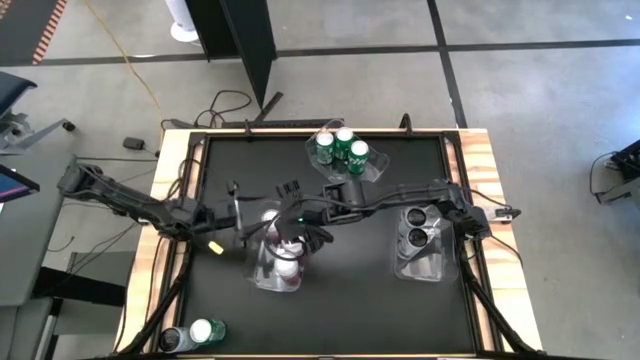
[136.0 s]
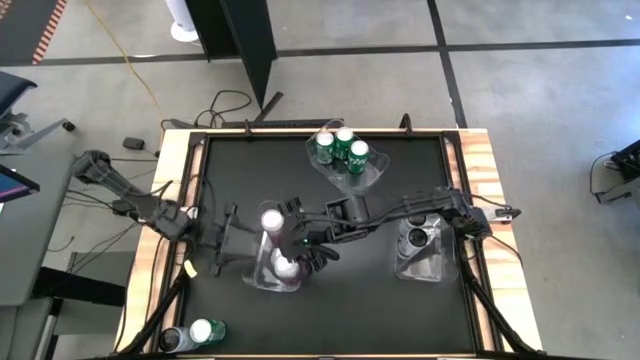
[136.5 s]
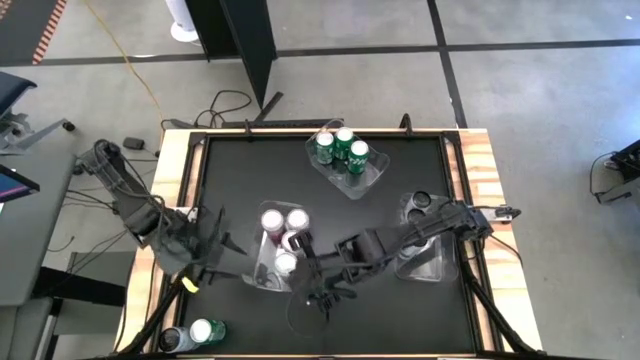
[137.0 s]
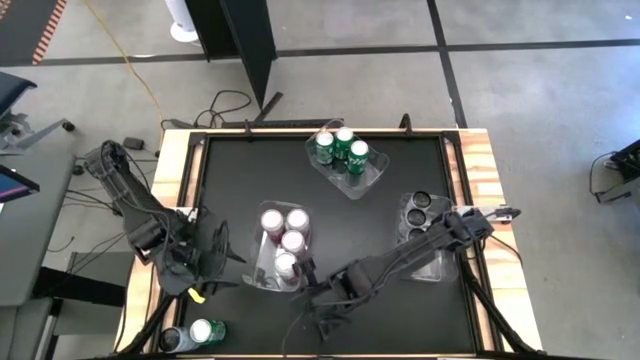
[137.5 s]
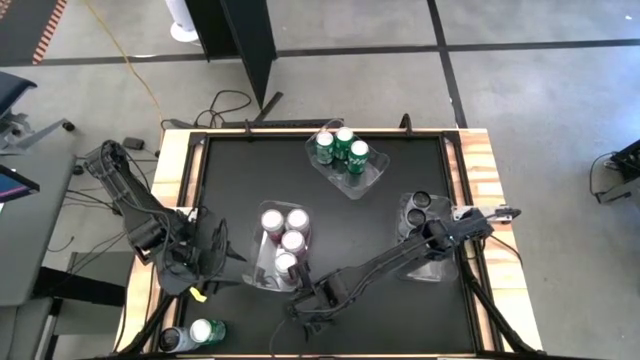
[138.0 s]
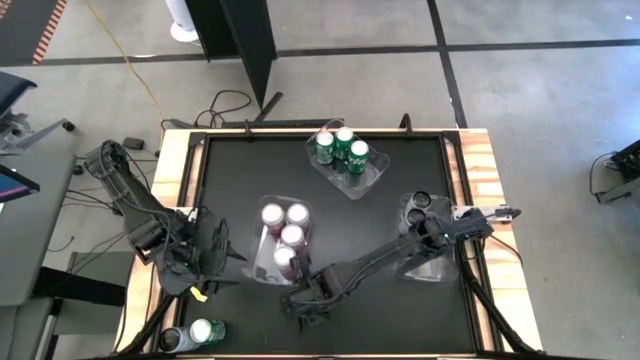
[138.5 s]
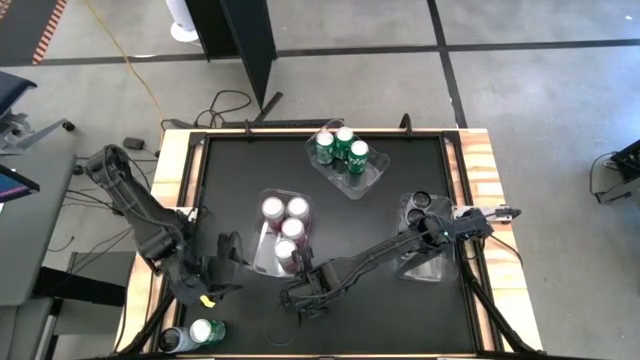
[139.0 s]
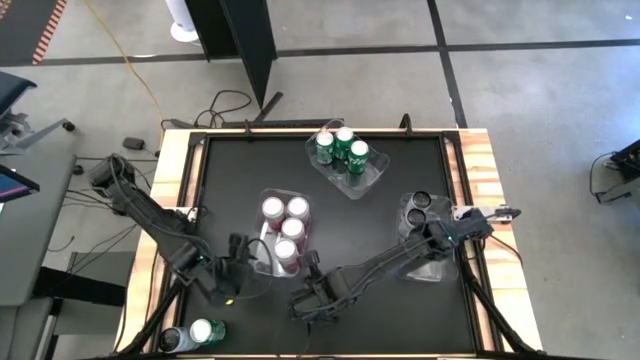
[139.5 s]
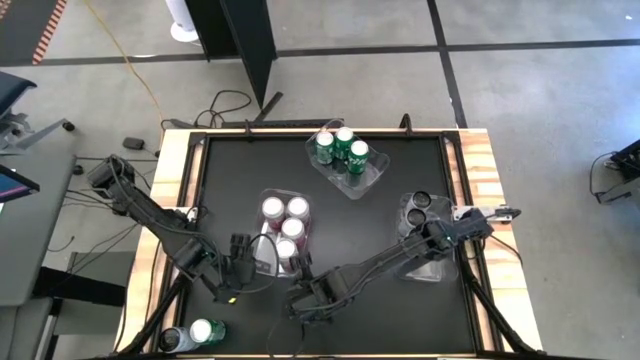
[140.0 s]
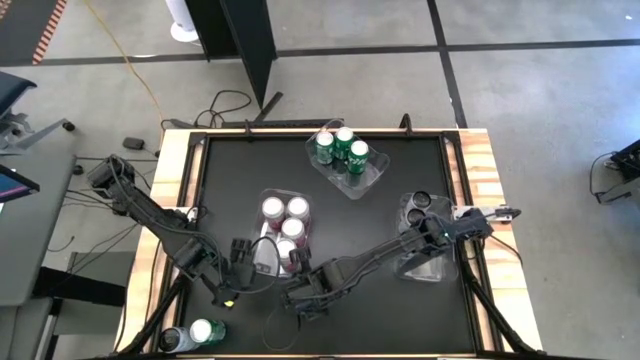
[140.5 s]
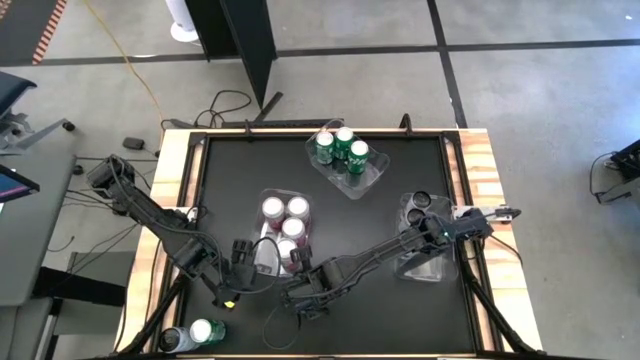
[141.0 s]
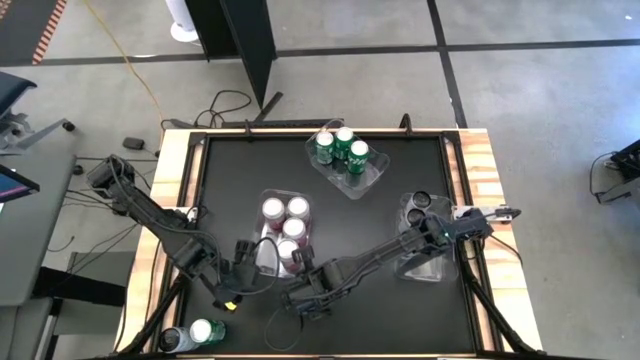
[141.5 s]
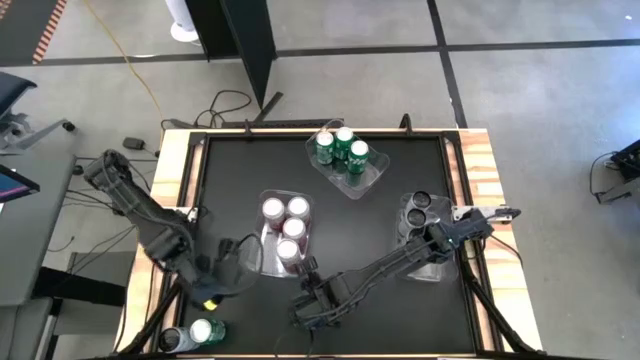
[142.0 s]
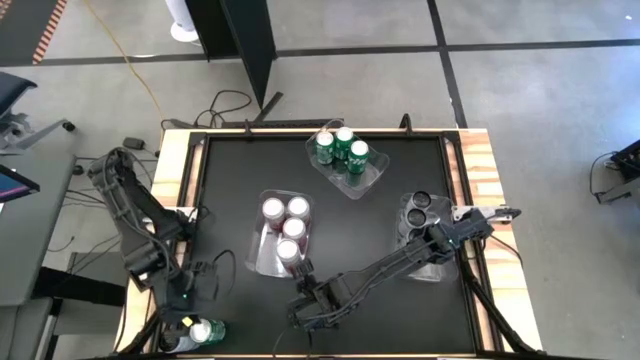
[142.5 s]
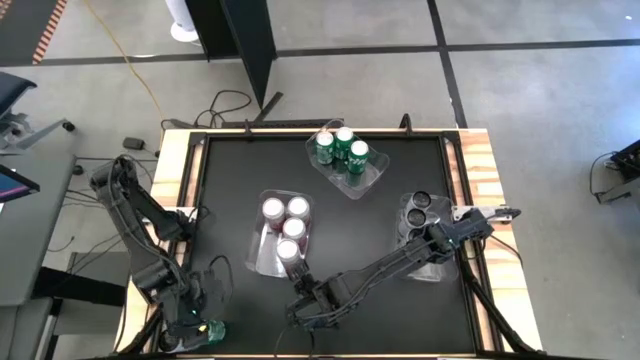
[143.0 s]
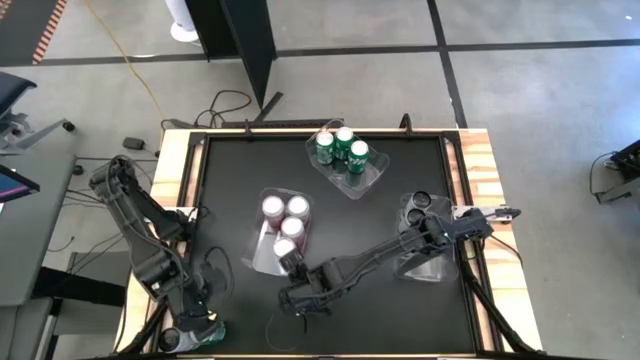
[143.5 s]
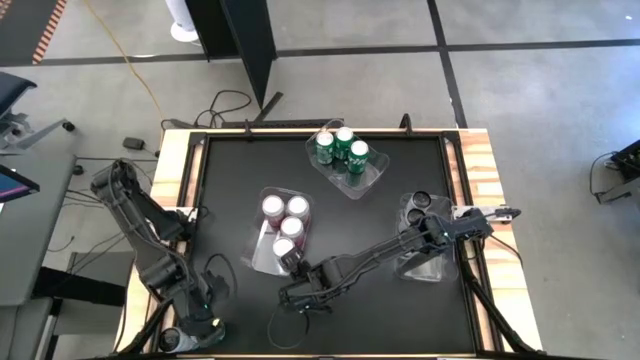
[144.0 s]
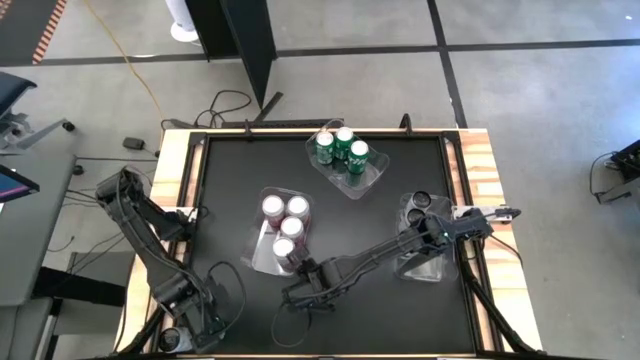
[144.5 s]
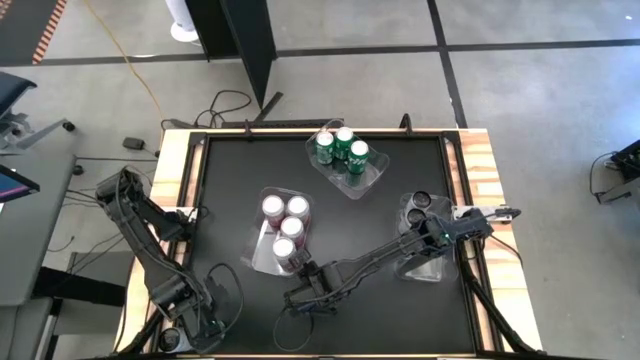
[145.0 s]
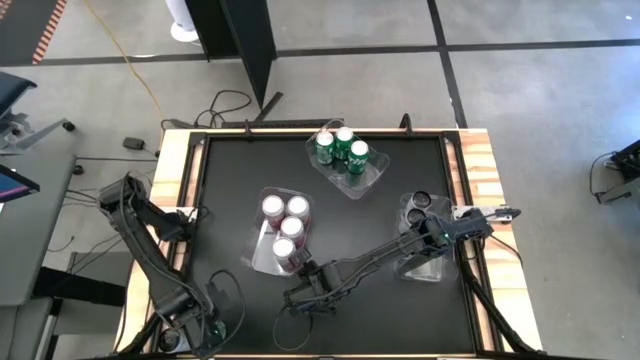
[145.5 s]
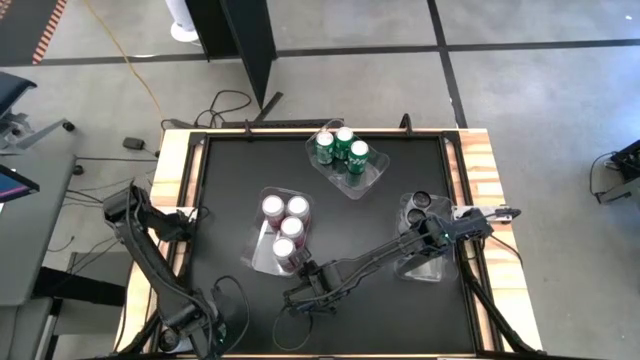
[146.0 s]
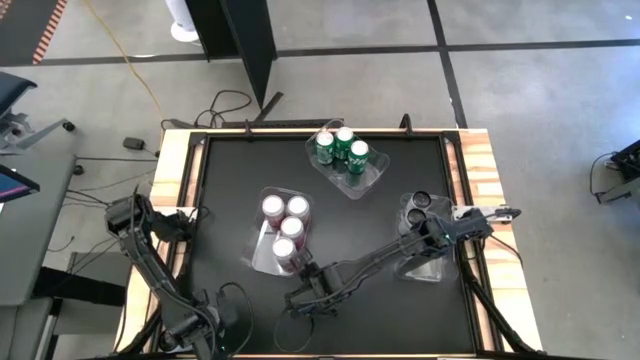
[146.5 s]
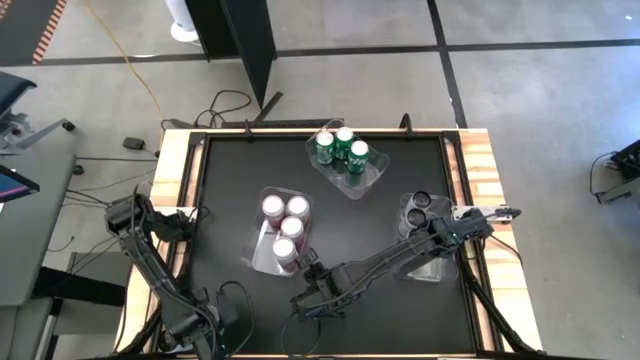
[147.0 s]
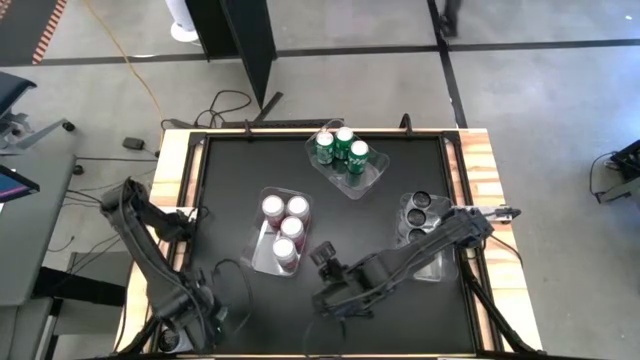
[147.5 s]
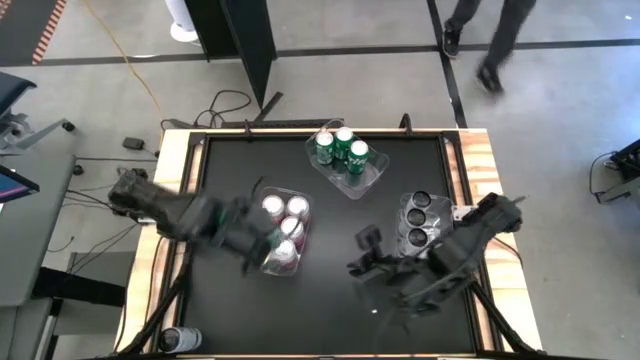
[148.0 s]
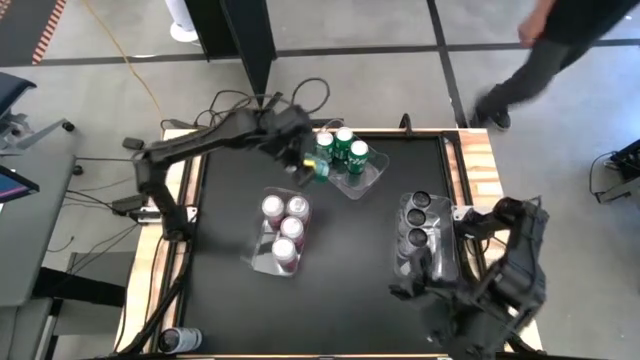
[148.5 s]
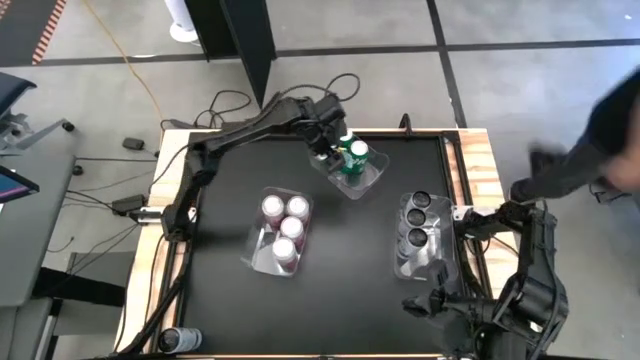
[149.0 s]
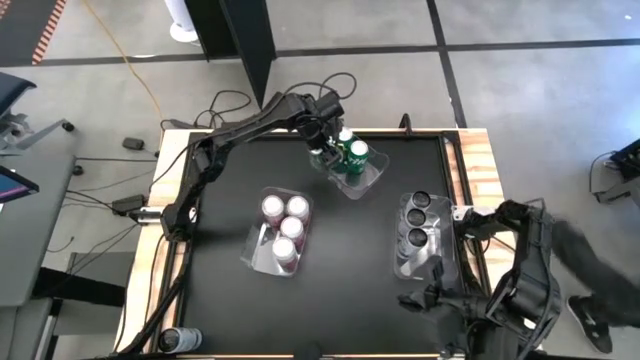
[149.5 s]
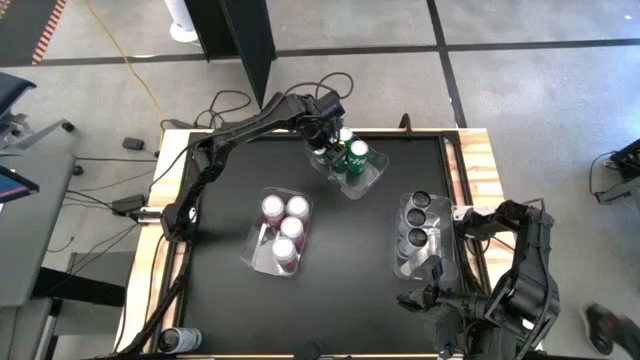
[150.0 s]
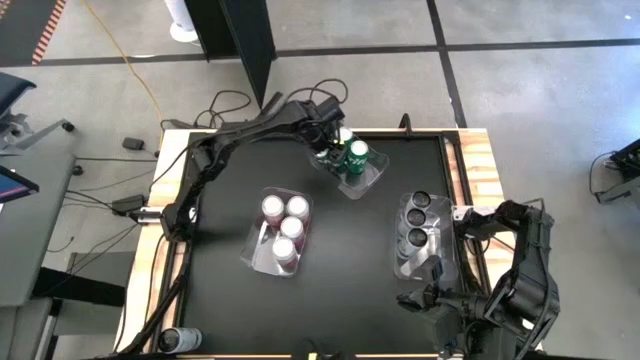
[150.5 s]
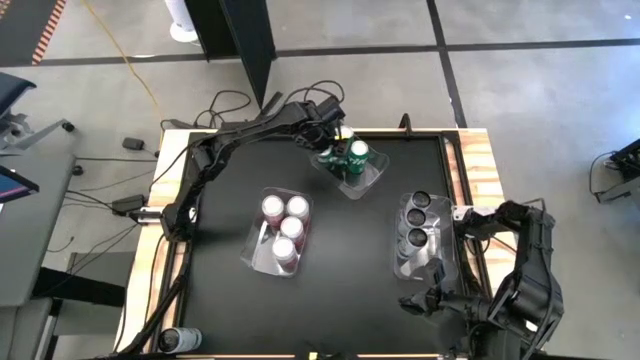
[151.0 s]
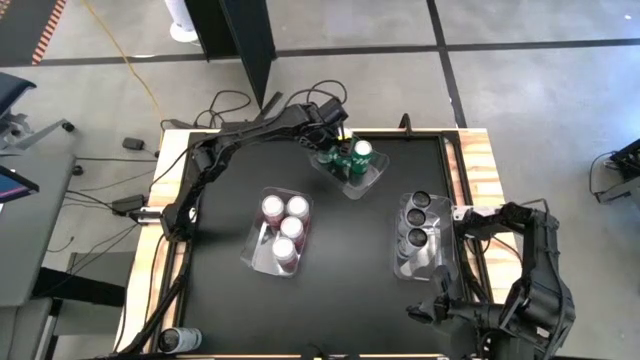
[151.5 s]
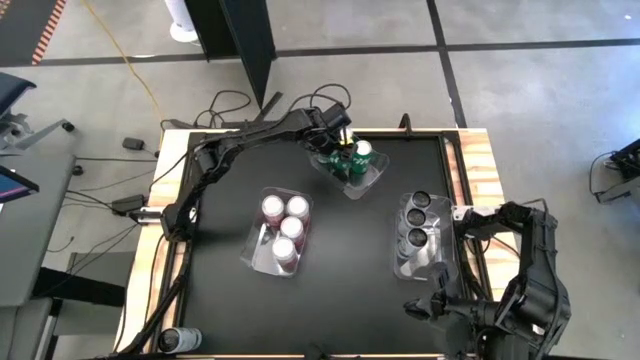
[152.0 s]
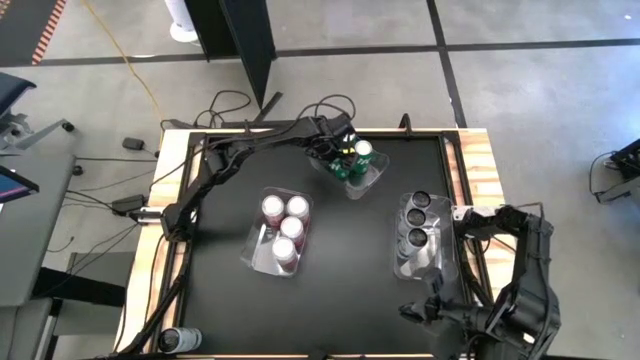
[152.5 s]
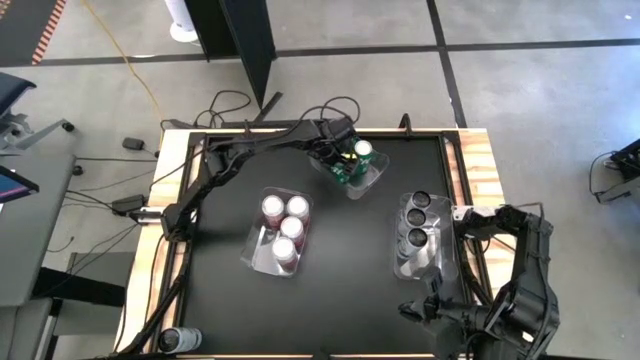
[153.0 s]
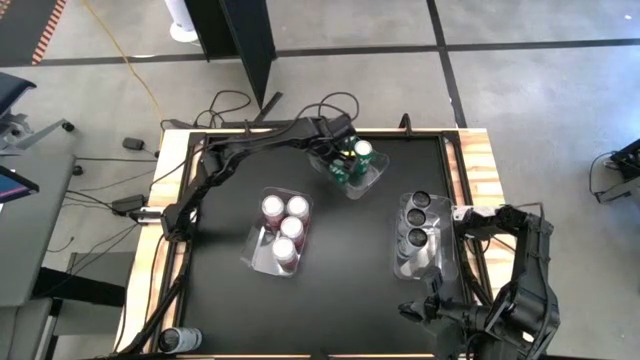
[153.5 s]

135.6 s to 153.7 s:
Task: Sort soda cans
Put the green soda can into the middle transparent bin

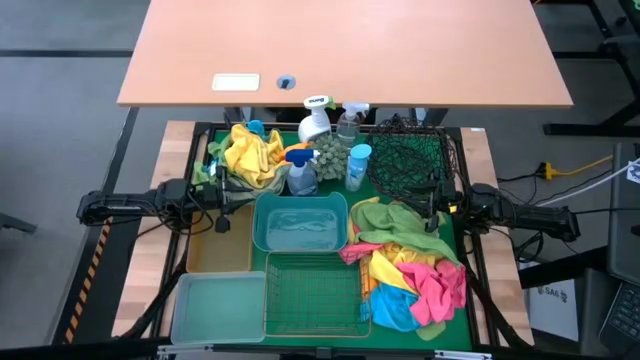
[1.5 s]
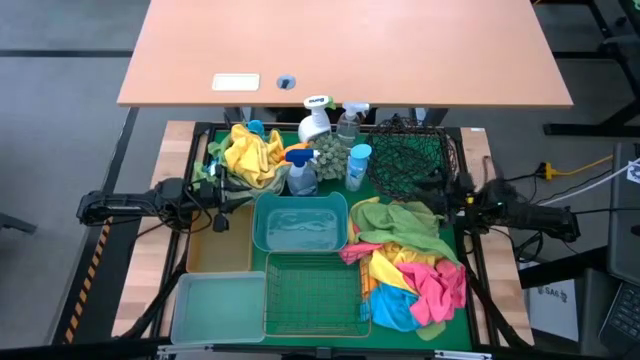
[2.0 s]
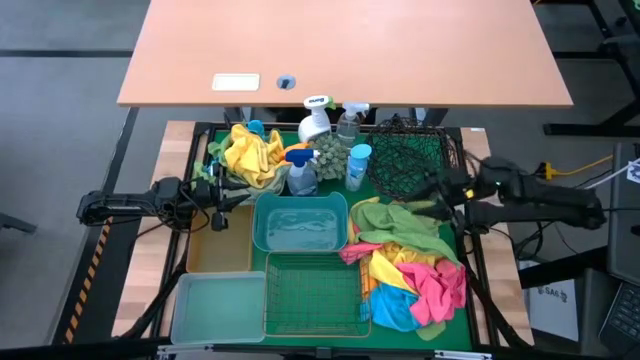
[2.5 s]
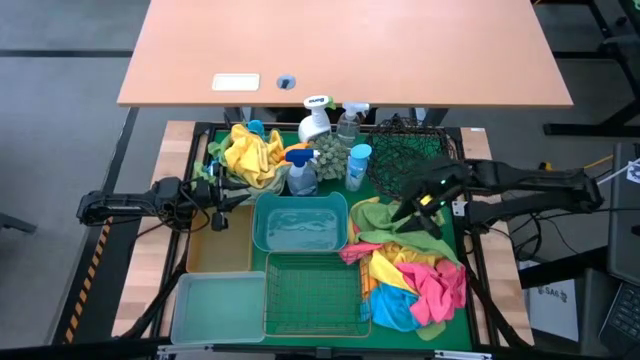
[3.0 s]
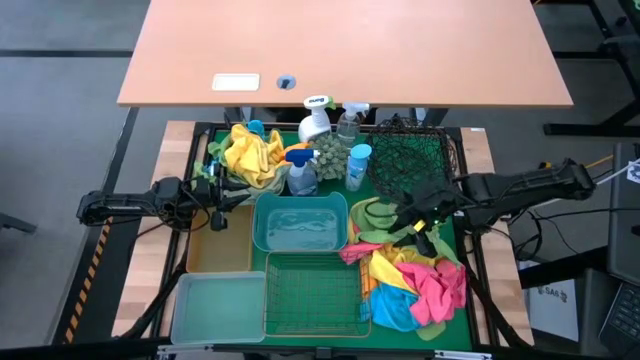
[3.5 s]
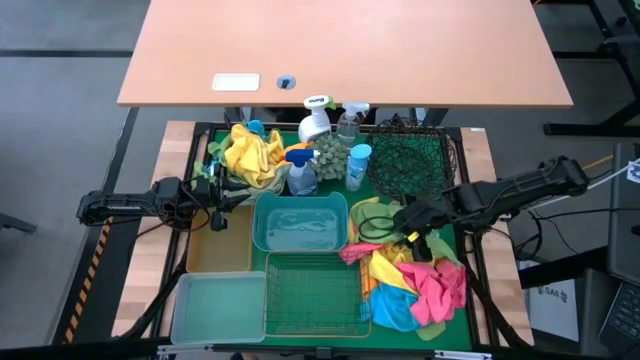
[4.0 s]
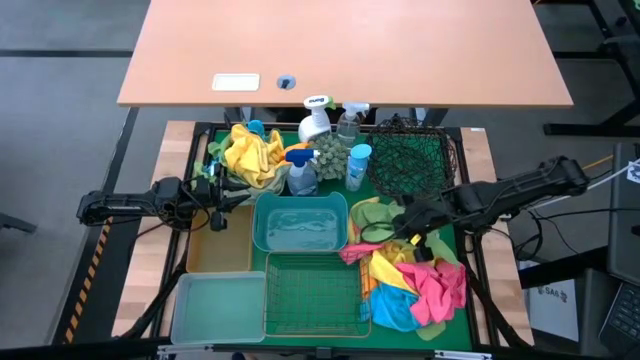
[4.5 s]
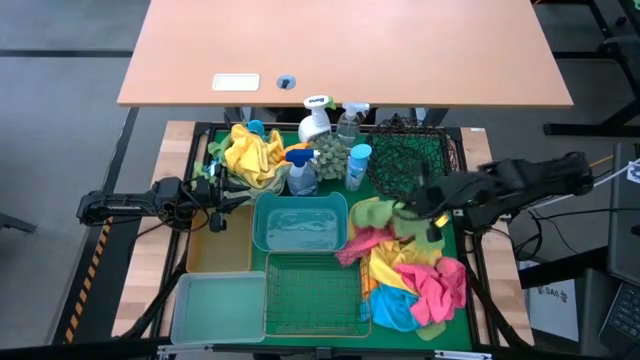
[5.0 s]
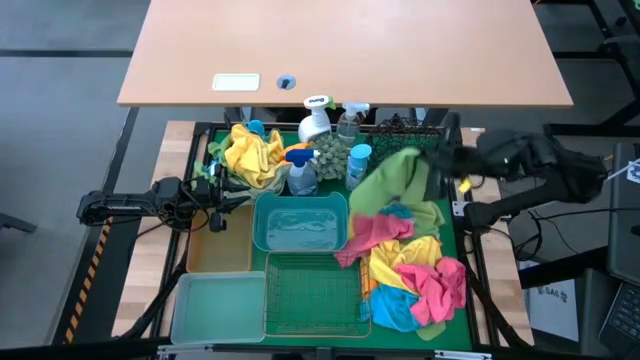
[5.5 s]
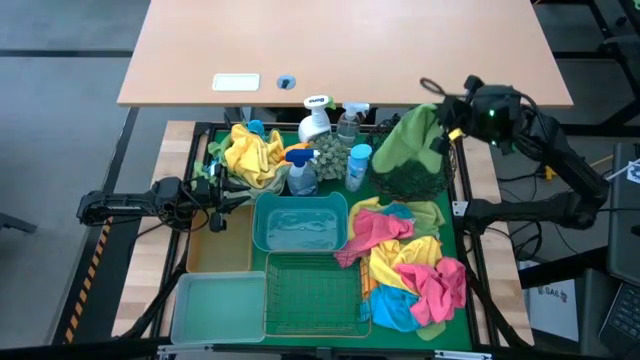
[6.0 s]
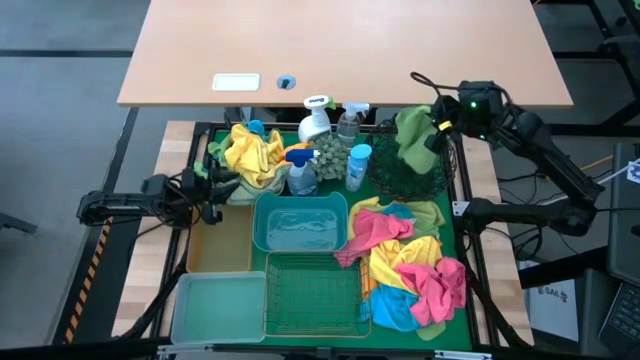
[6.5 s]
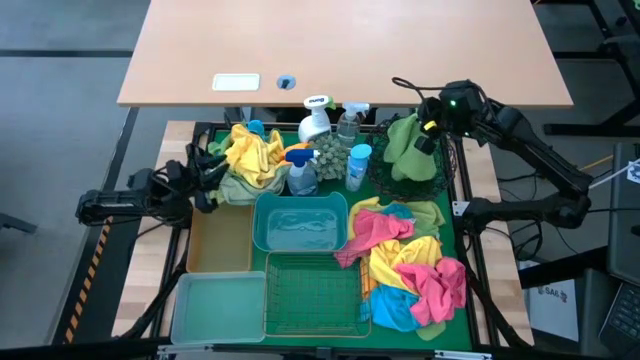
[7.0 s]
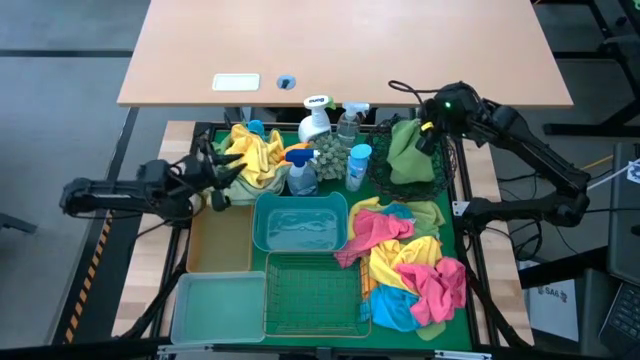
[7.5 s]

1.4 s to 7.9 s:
Task: Sort microfiber towel by color & place in baskets
Put the green microfiber towel into the black wire basket
